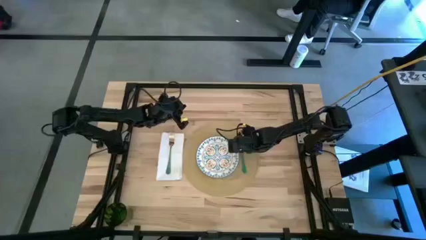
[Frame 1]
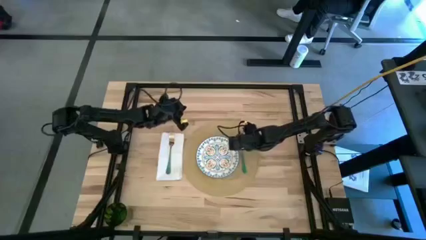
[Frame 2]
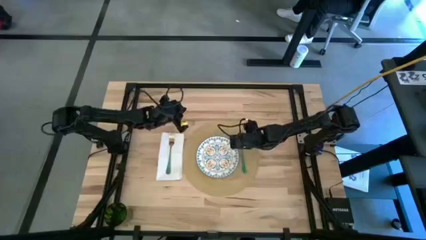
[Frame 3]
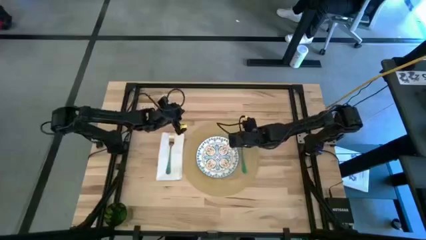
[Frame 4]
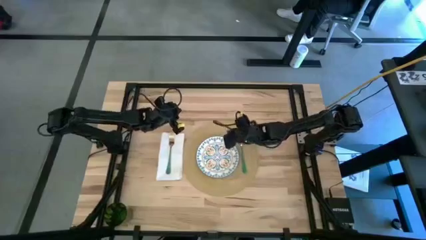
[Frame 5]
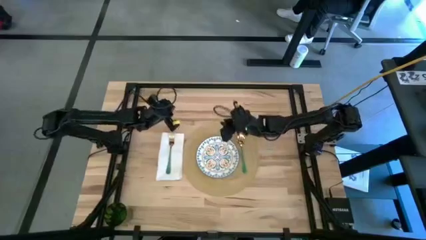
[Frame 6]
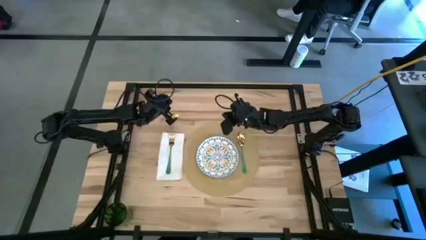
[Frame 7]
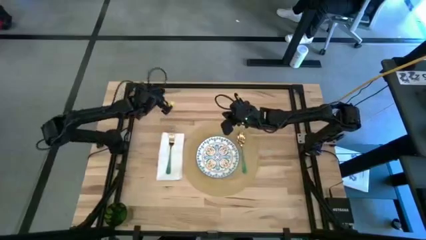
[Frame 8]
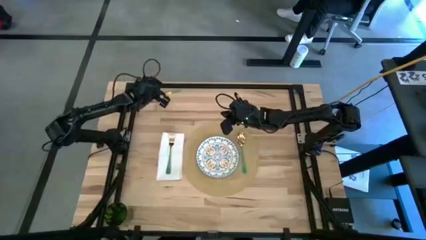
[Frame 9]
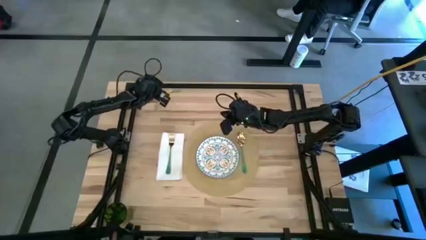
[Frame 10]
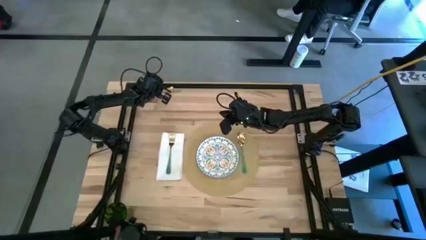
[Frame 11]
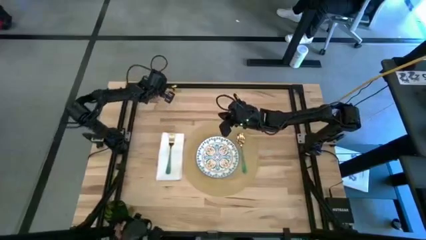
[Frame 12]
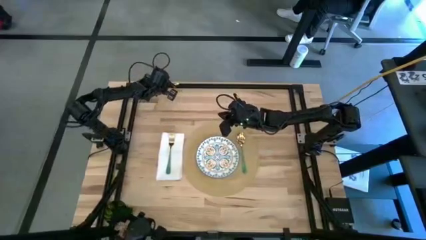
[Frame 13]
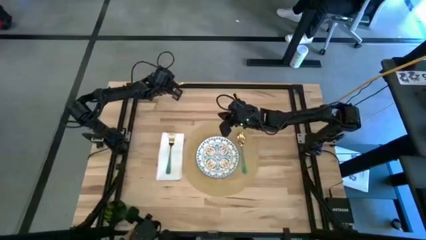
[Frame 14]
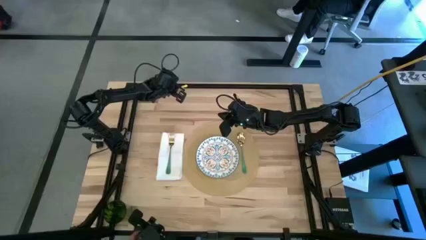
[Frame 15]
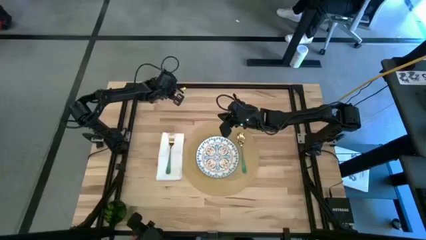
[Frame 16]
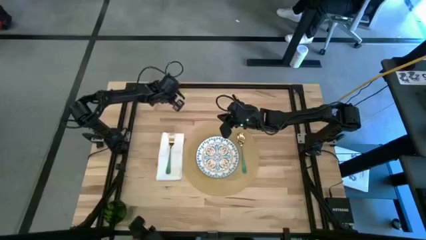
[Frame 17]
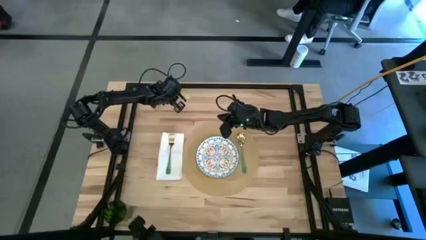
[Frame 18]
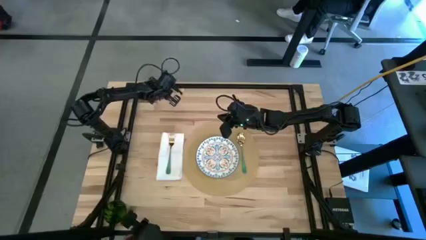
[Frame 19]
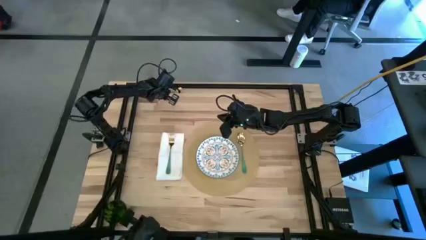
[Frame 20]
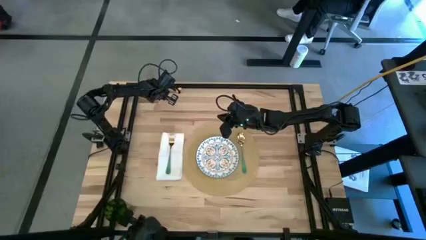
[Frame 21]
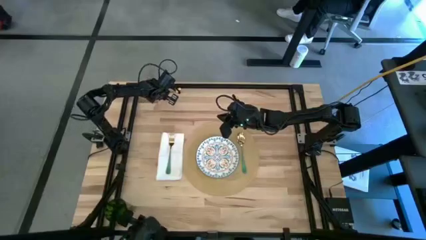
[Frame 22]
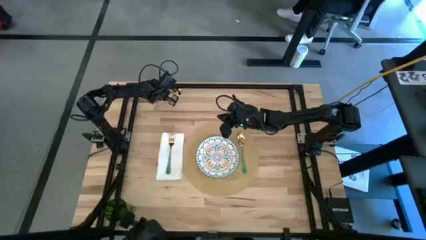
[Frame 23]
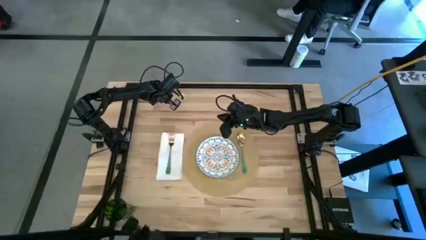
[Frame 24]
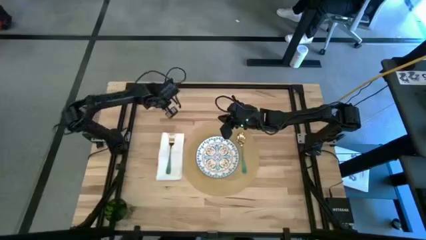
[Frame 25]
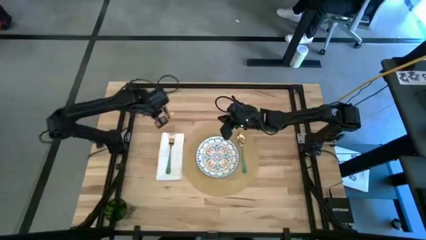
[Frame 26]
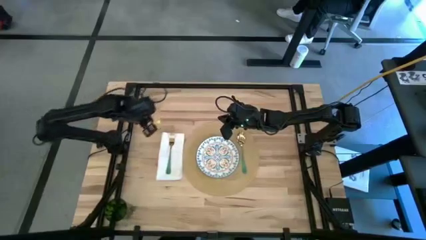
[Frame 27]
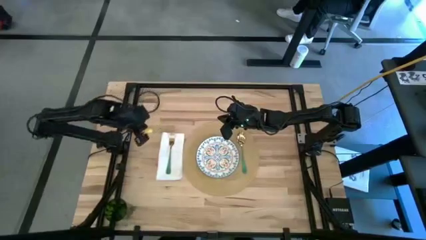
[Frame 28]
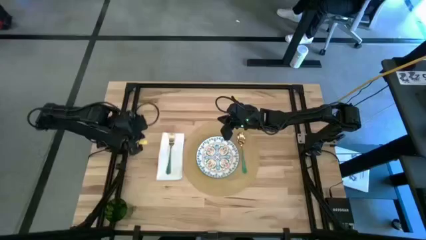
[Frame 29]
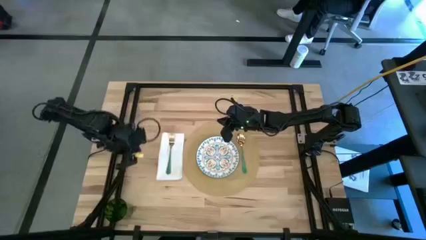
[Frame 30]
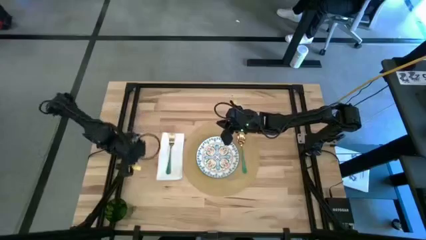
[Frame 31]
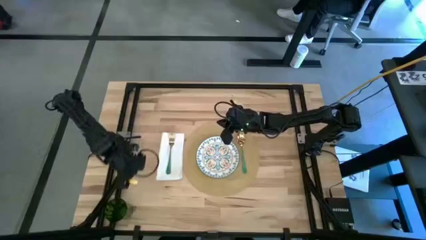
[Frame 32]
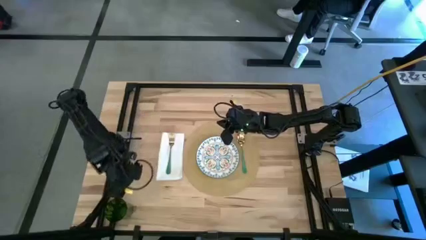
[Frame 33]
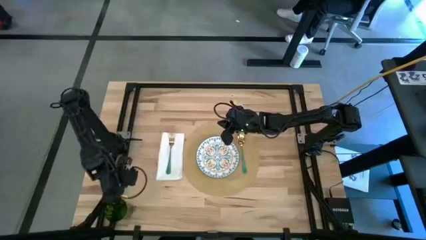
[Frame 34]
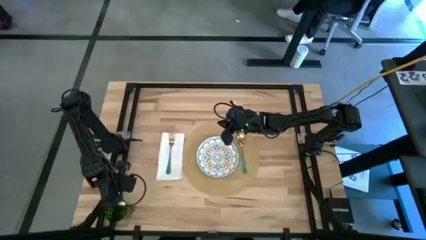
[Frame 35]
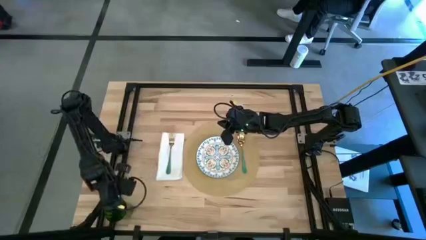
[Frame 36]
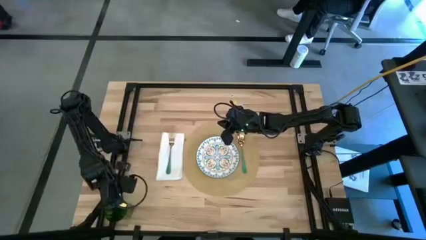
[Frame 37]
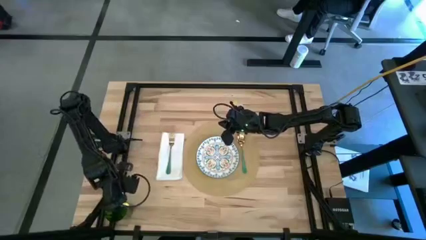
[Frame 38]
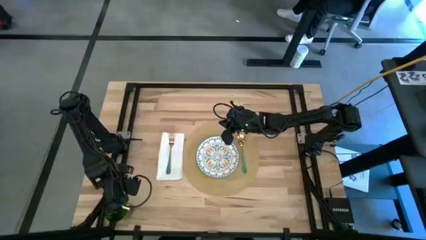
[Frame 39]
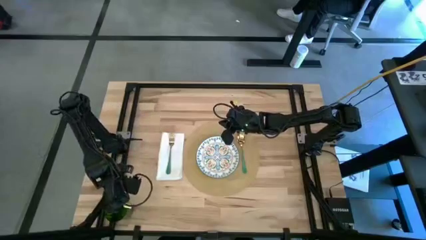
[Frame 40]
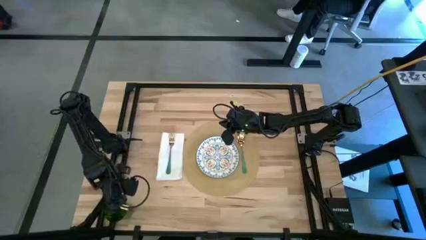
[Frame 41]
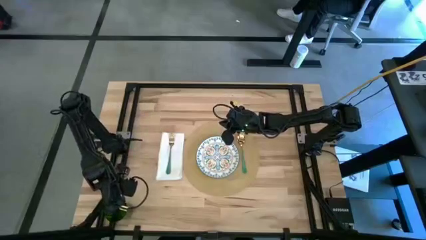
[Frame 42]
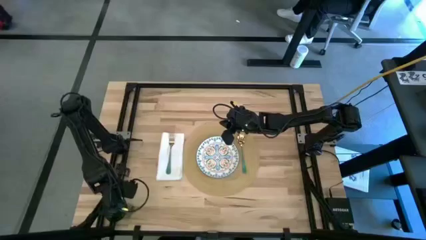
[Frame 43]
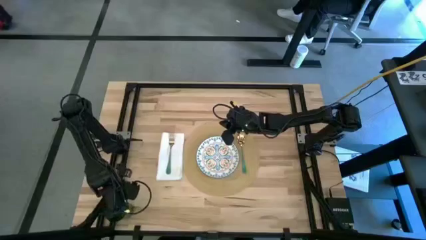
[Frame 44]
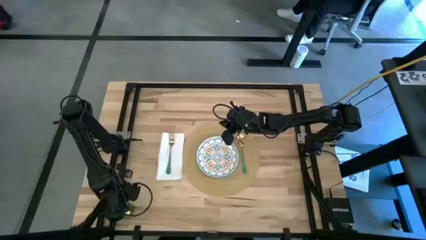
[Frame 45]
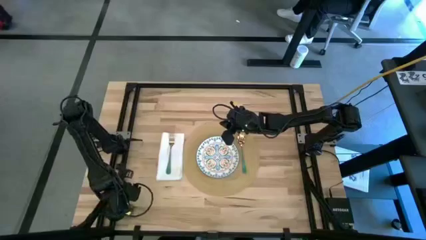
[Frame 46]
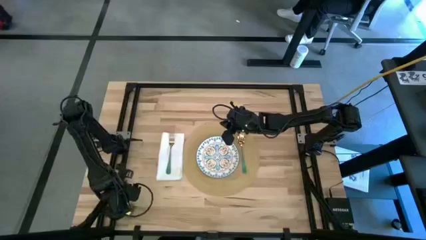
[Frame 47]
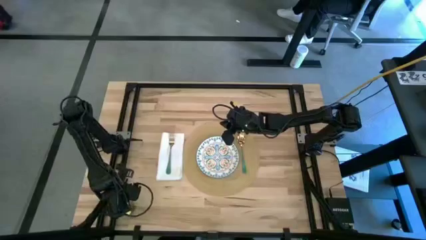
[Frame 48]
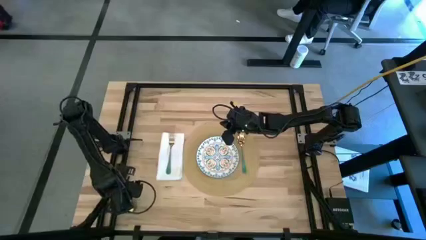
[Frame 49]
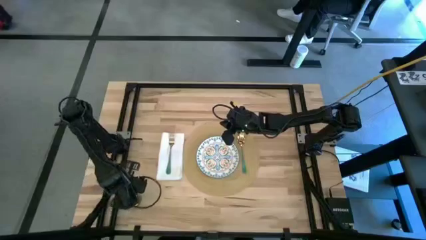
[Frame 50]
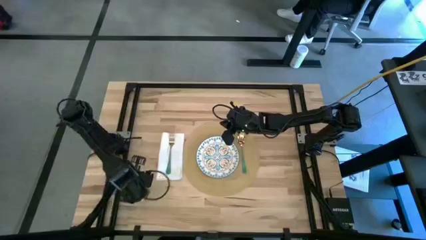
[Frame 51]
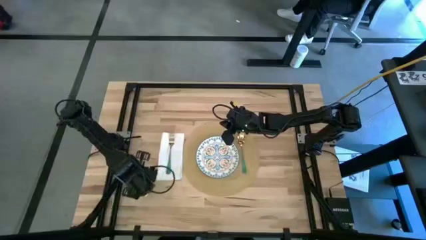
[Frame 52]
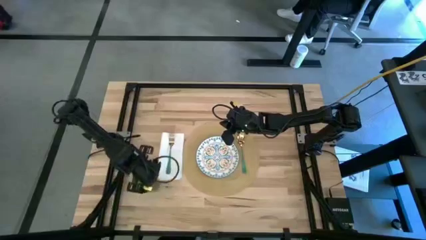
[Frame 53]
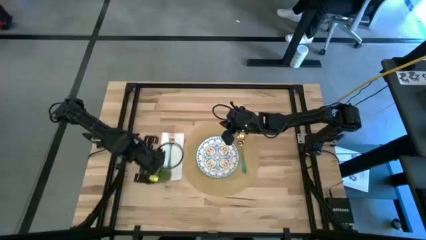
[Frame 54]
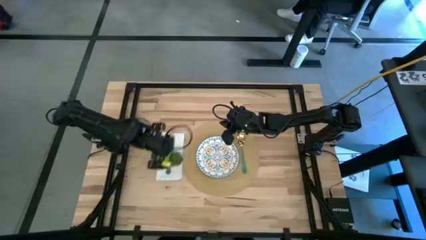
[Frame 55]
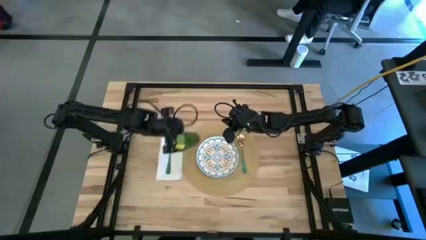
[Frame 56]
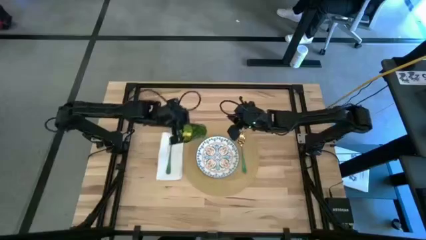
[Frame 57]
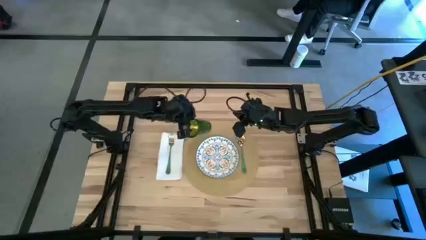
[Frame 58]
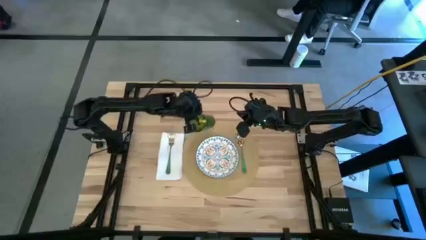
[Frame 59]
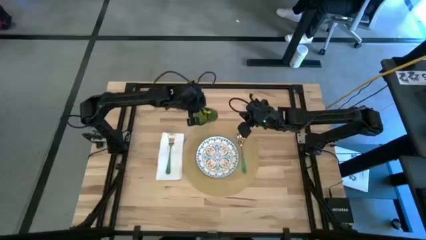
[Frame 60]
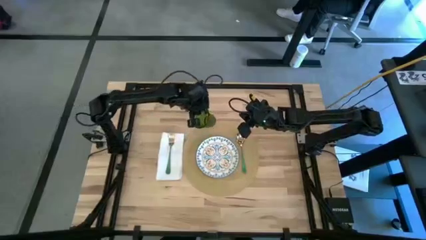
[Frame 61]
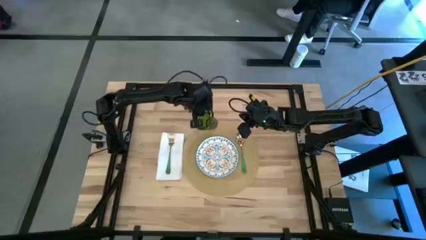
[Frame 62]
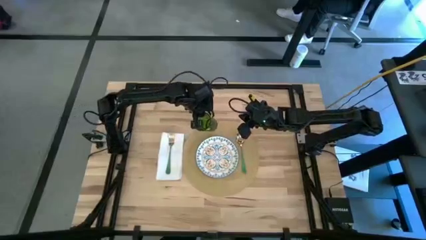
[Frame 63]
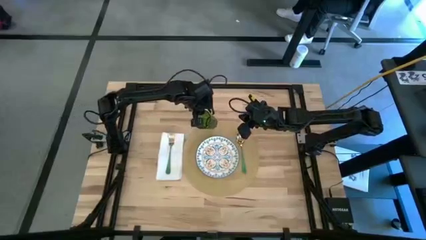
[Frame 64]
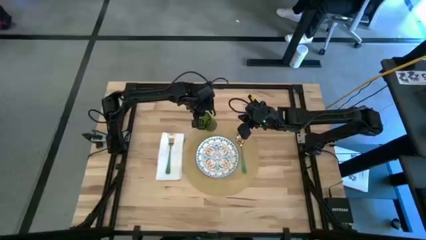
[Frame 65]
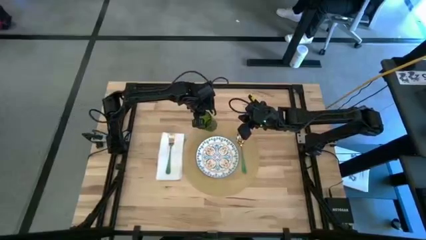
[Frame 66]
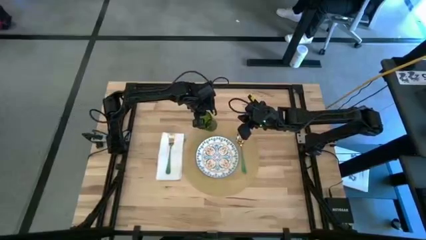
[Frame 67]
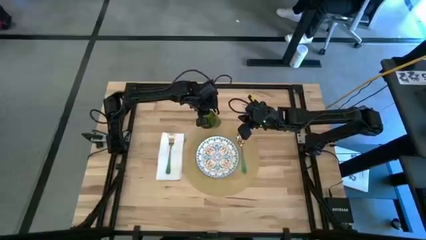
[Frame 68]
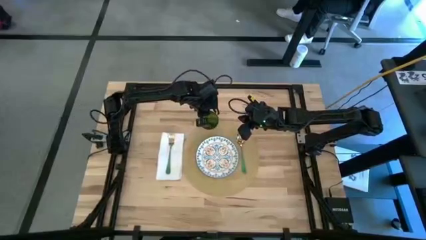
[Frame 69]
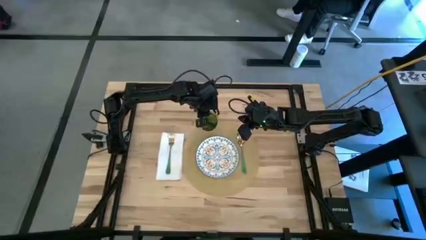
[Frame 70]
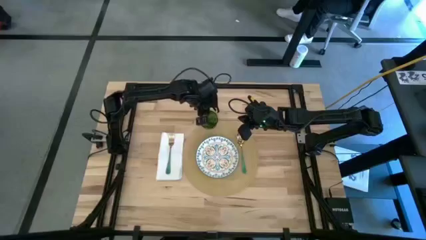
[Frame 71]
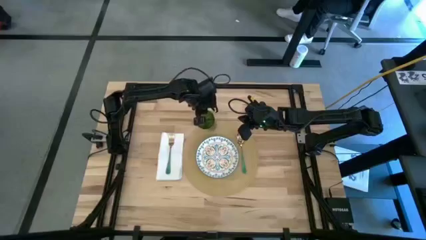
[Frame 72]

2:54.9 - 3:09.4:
Task: Set table place
Put the green glass cup beside the brown placemat
